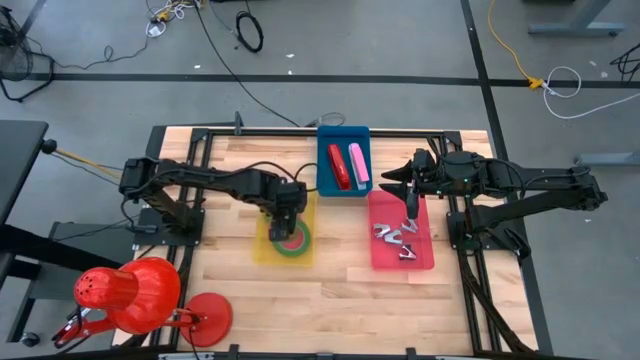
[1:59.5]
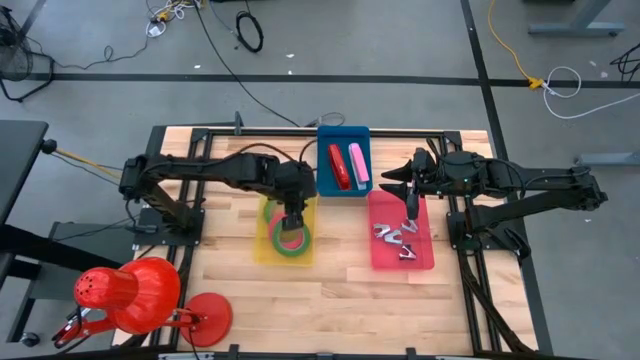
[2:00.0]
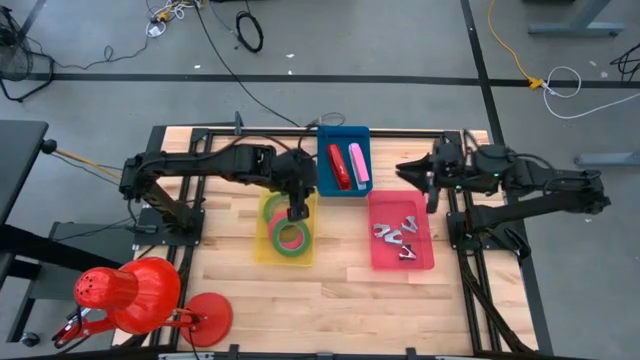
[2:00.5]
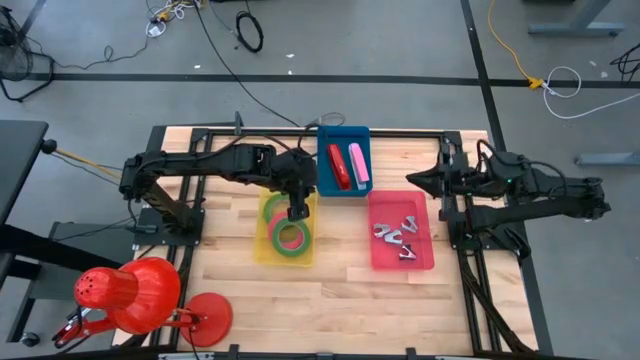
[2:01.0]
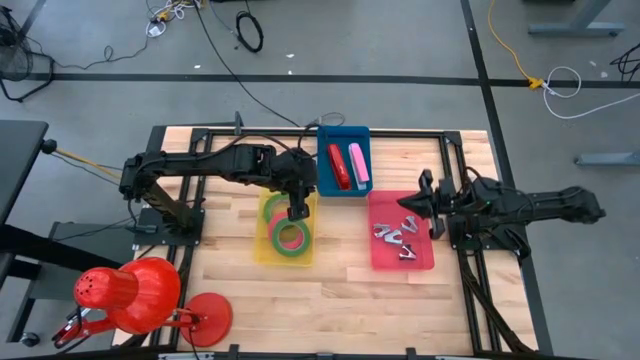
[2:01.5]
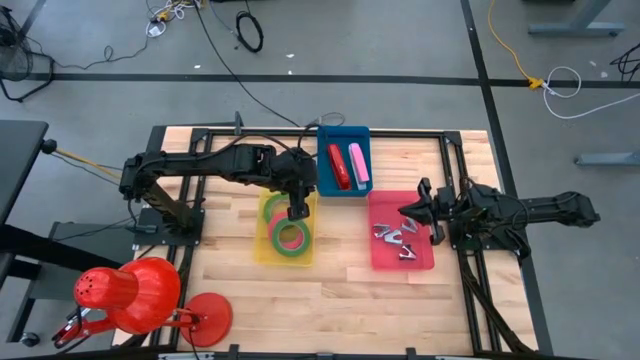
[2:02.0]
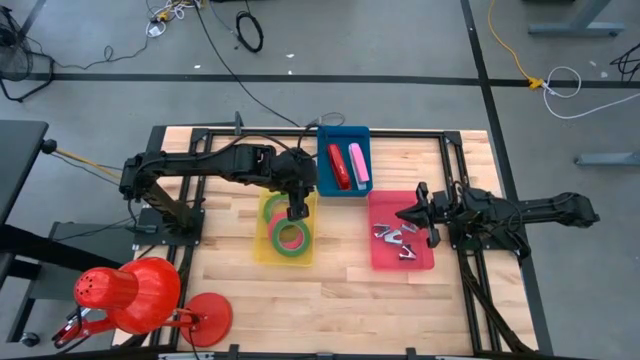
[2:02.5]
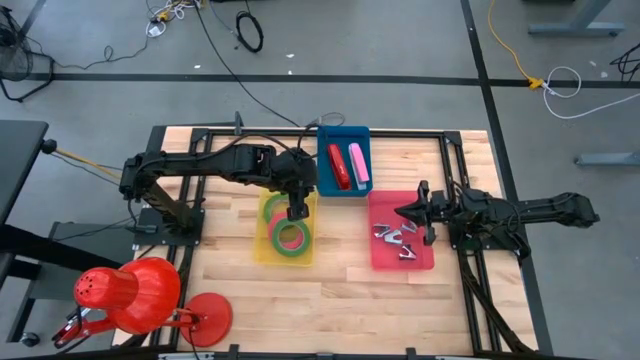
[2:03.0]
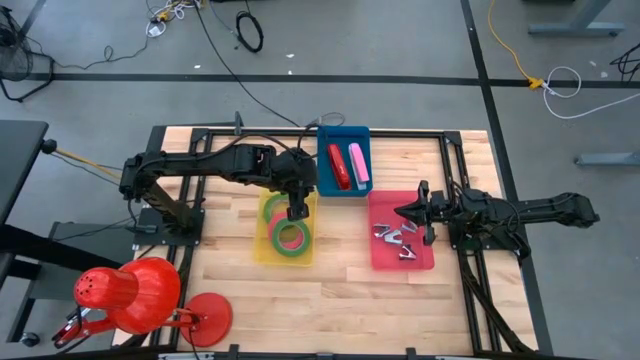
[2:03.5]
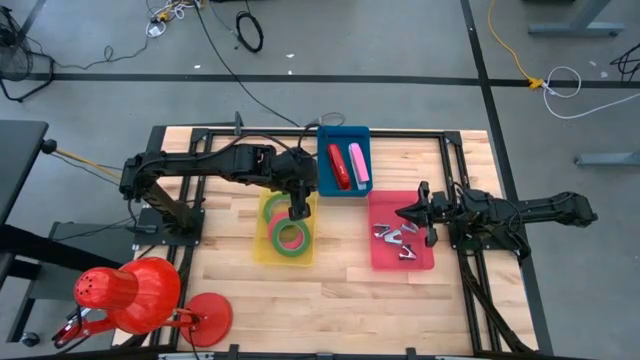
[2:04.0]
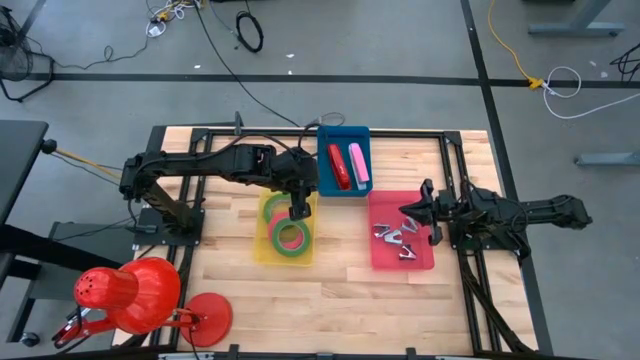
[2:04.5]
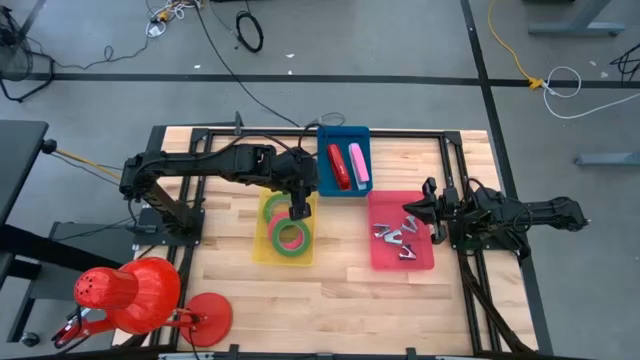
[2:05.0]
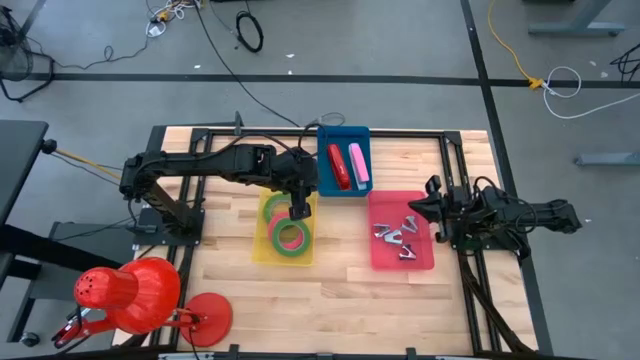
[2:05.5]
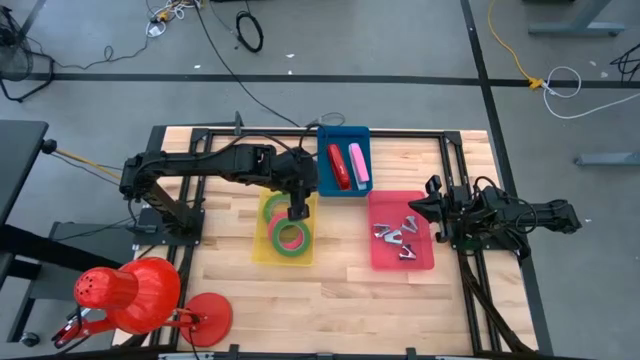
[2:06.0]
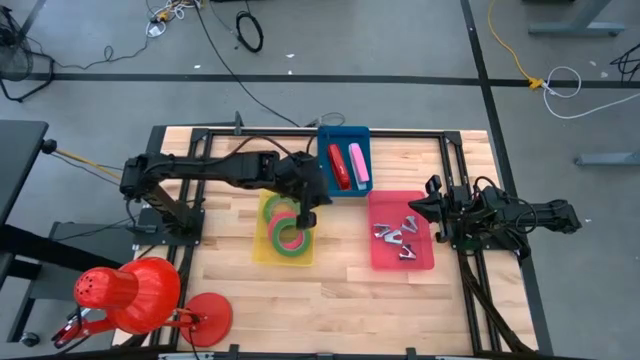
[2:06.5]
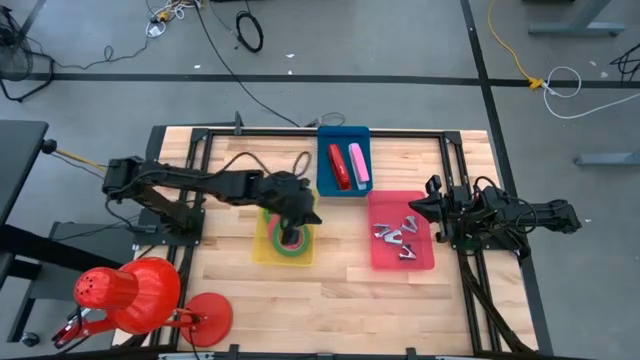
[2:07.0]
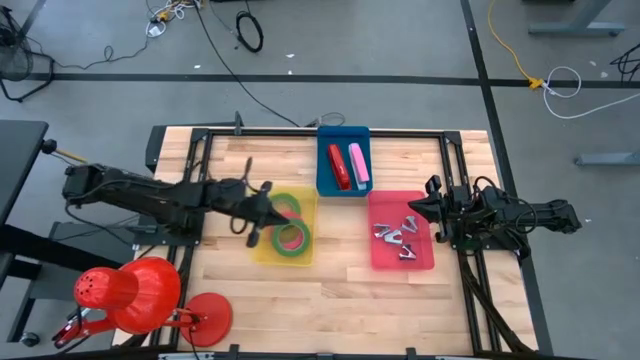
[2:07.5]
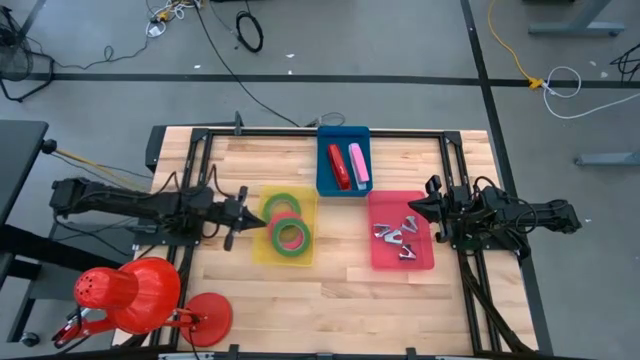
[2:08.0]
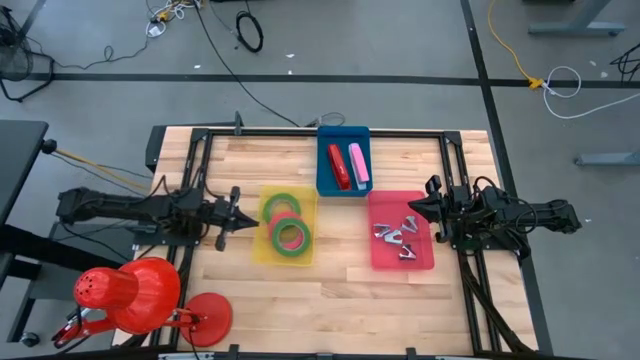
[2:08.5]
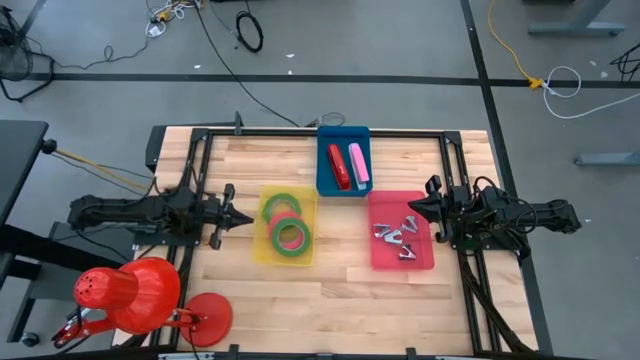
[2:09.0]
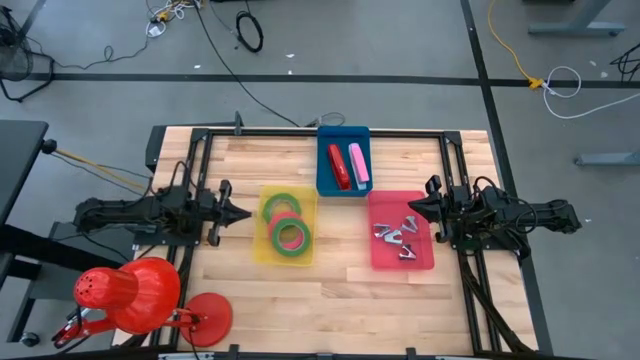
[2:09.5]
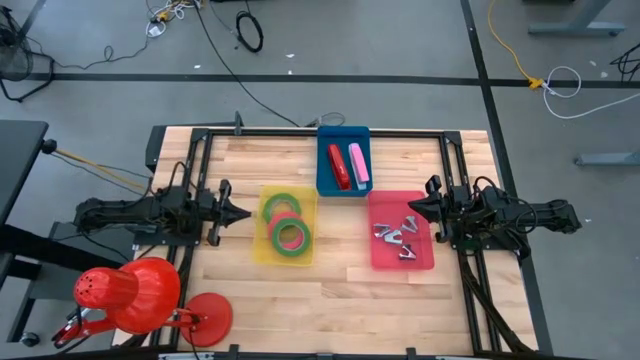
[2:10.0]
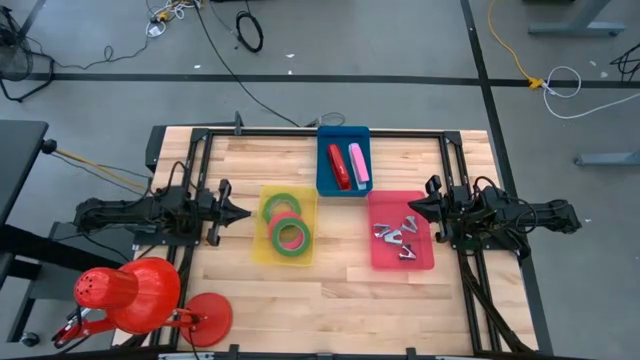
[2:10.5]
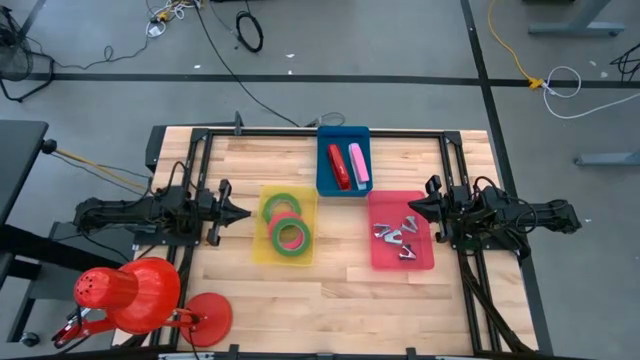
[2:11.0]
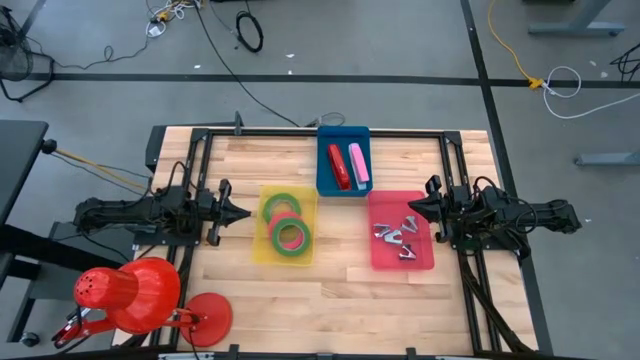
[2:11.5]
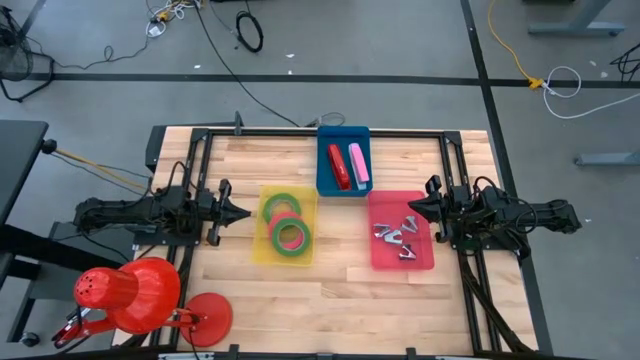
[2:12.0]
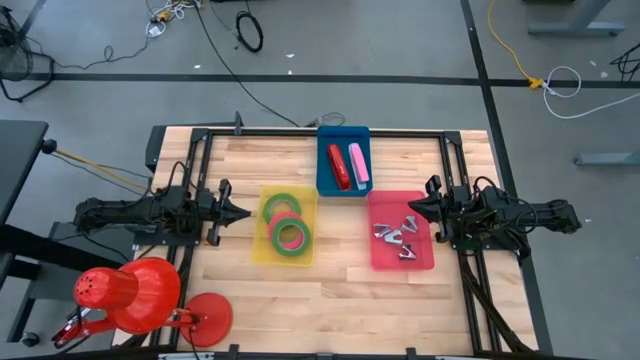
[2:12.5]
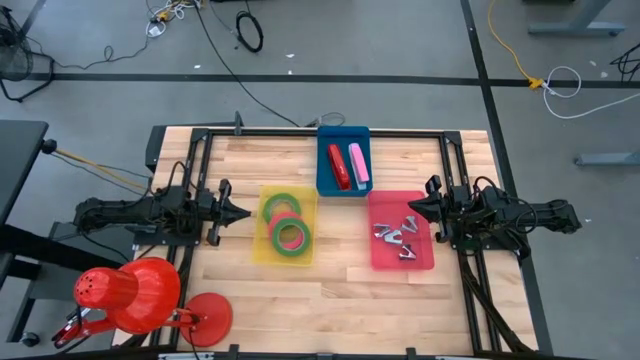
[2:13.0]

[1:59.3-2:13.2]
Task: Pick and place Stapler, Stapler remover, tape
Return to Home Position

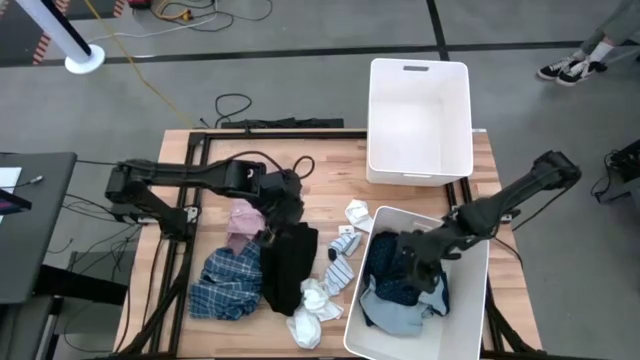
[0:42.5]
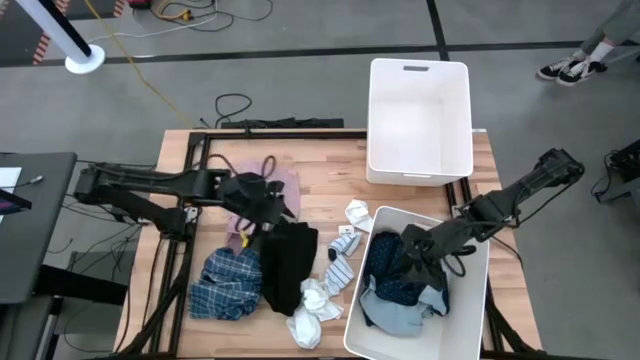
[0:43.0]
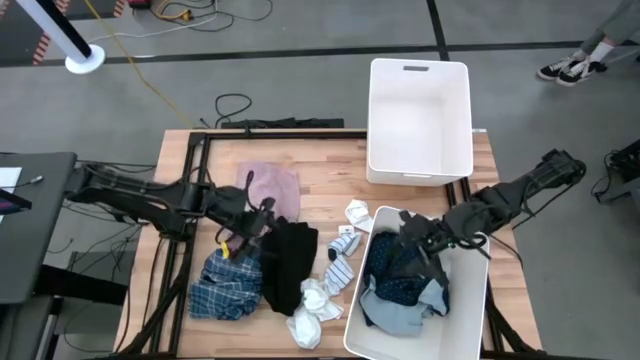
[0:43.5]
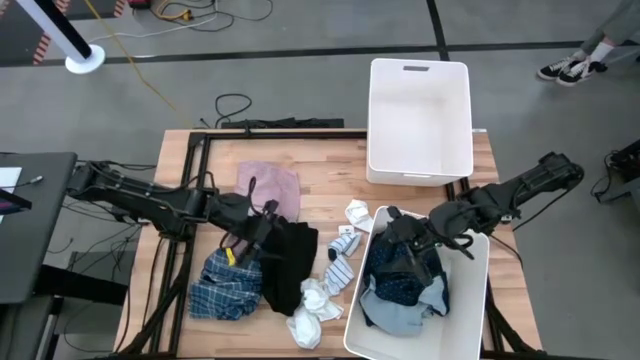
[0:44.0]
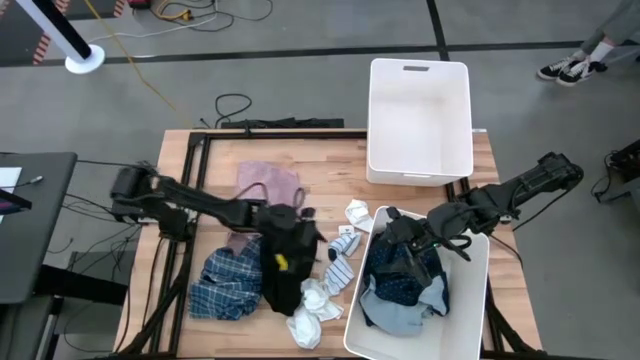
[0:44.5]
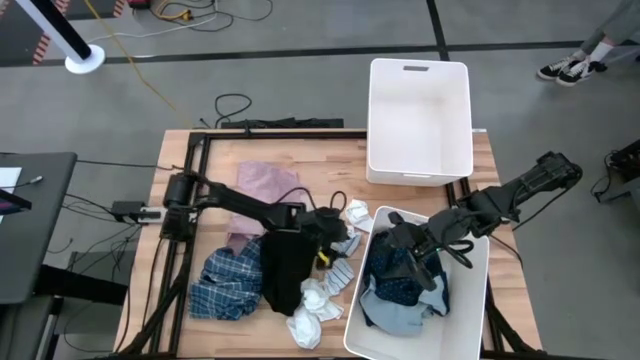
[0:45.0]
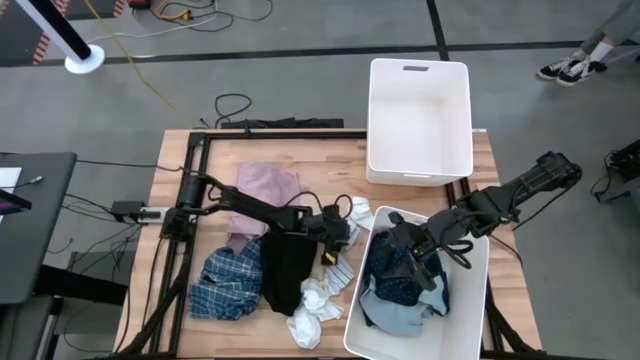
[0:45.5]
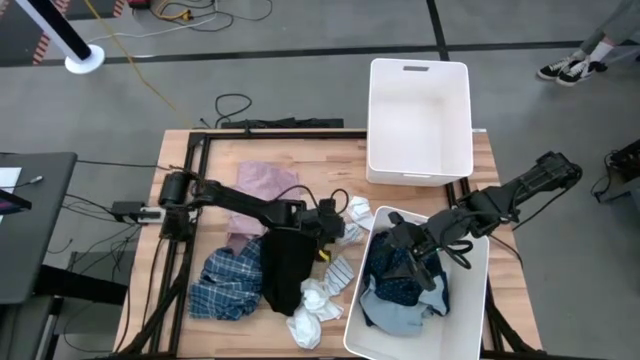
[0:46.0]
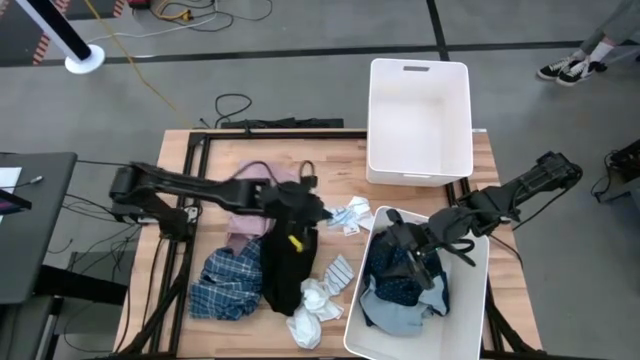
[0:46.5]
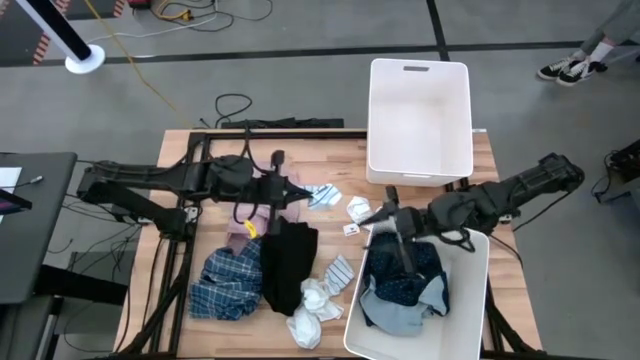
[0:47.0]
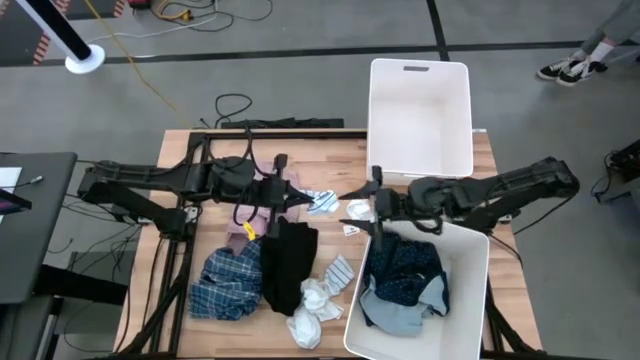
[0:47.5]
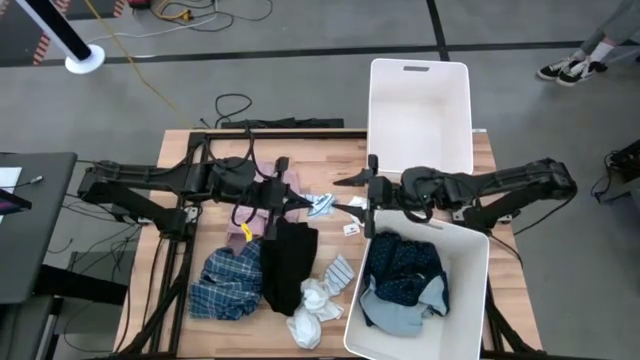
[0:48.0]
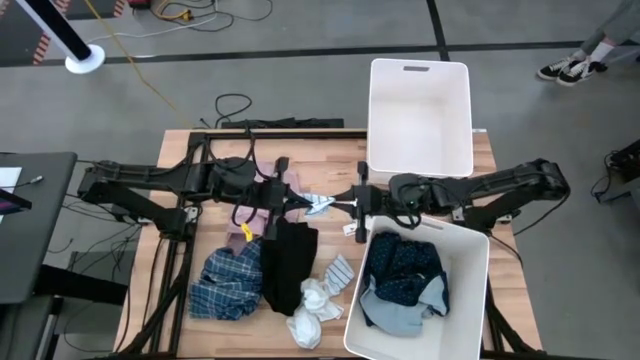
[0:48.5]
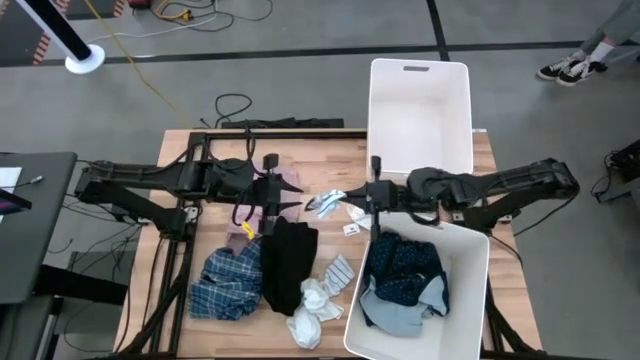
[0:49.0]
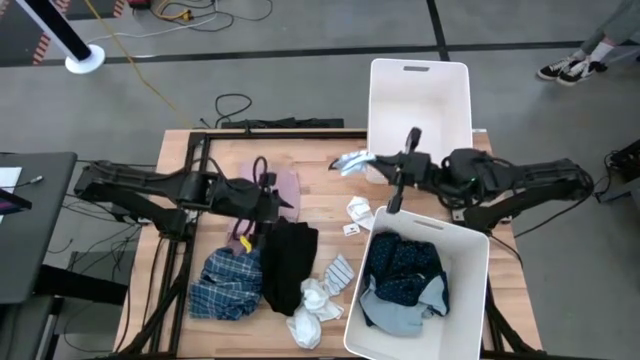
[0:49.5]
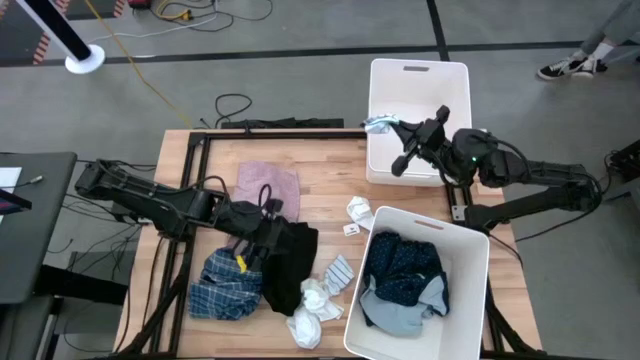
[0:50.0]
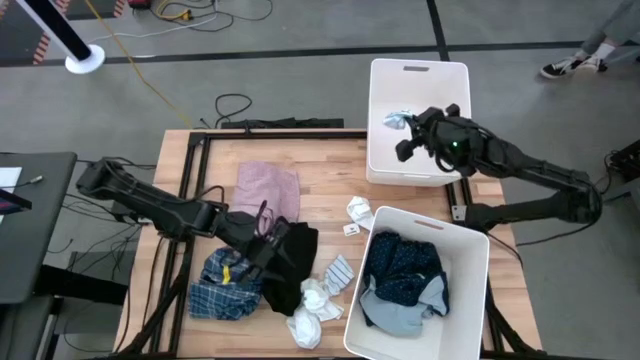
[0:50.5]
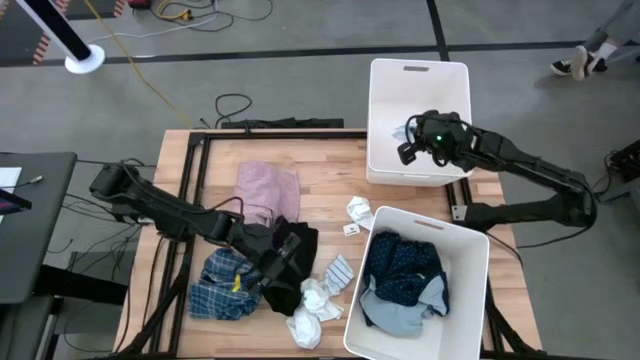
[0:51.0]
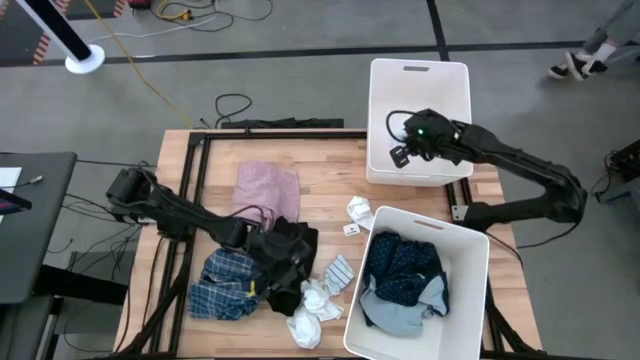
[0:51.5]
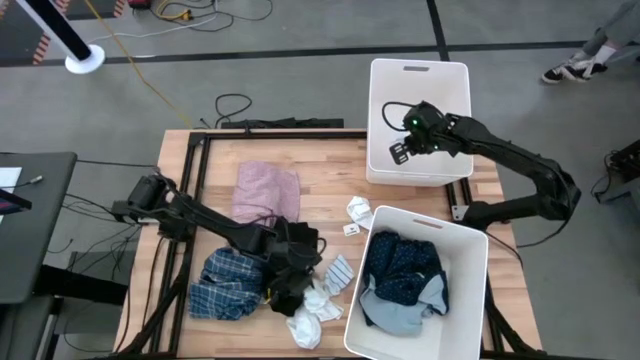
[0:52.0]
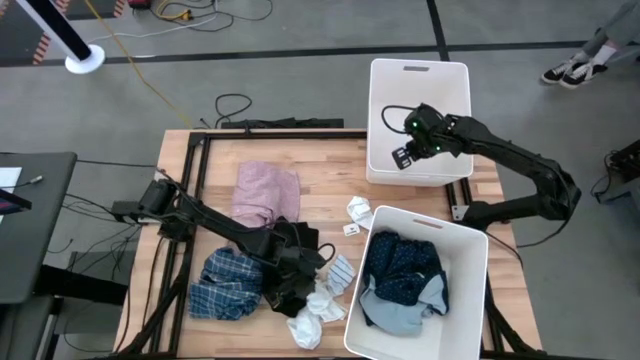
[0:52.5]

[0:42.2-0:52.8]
Task: Sort clothes
Put the top striped white sock in the top laundry bin
